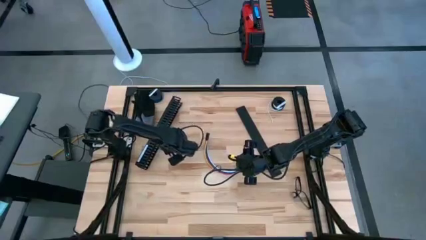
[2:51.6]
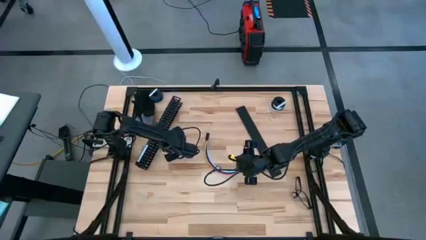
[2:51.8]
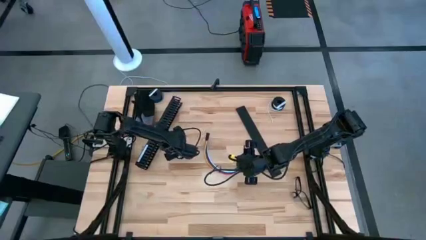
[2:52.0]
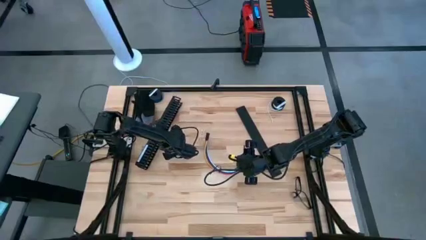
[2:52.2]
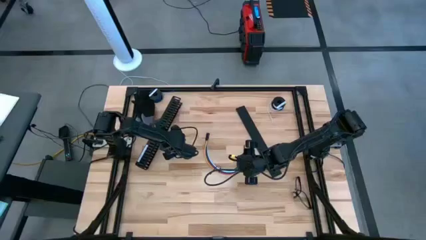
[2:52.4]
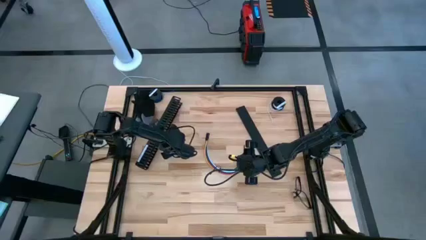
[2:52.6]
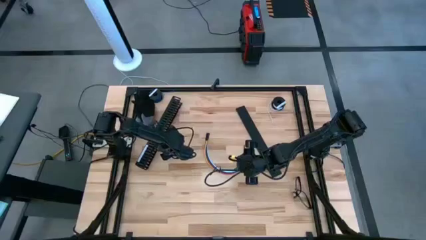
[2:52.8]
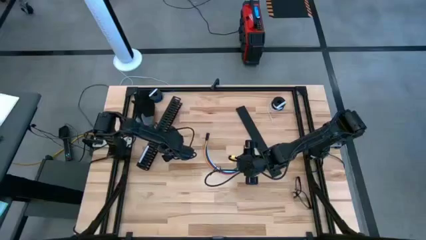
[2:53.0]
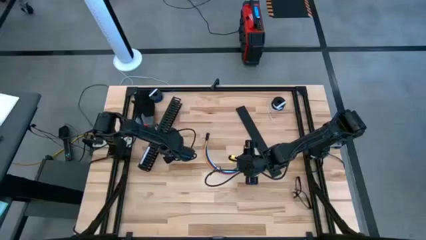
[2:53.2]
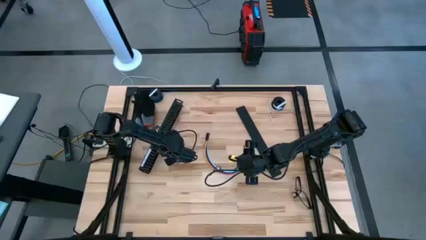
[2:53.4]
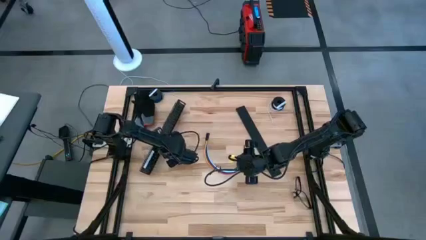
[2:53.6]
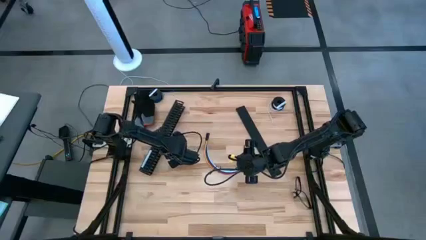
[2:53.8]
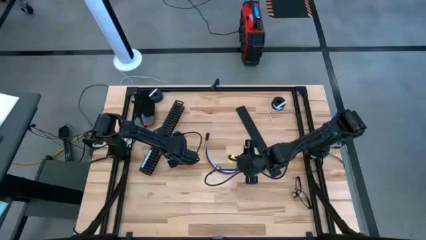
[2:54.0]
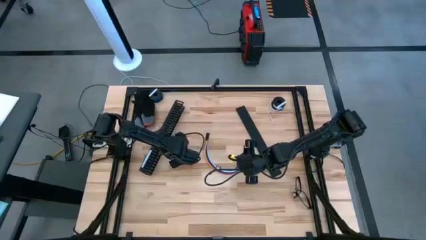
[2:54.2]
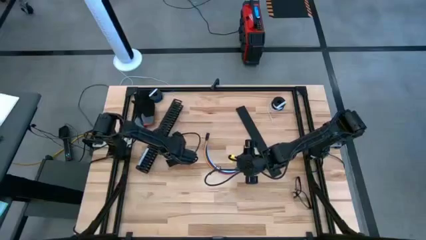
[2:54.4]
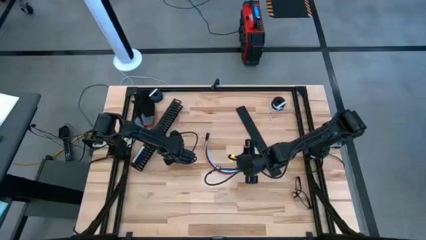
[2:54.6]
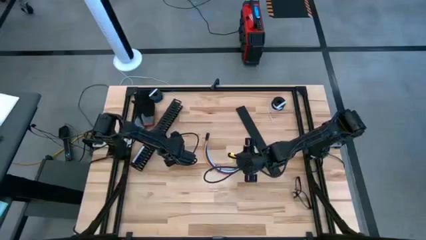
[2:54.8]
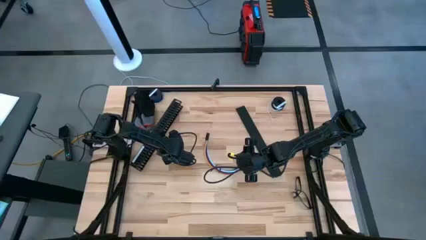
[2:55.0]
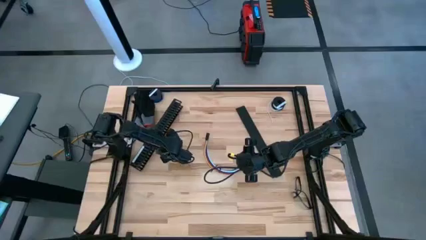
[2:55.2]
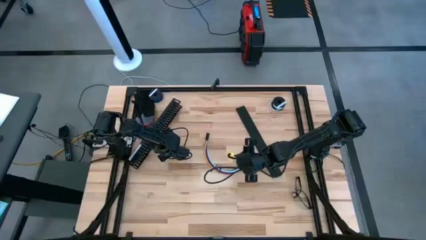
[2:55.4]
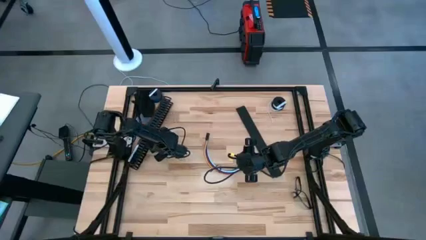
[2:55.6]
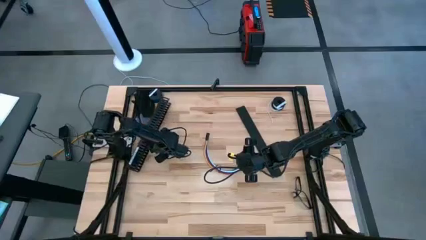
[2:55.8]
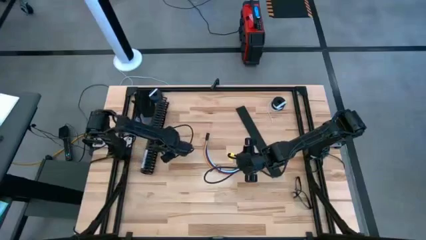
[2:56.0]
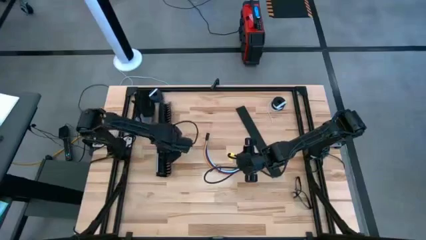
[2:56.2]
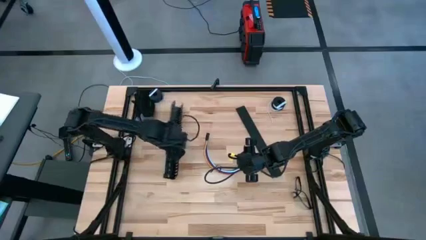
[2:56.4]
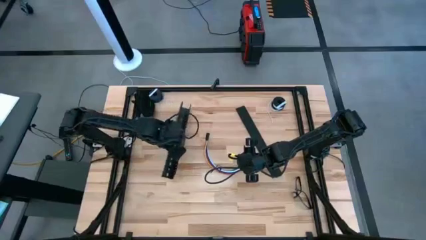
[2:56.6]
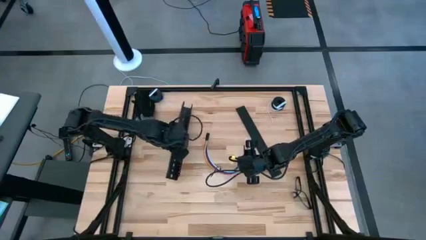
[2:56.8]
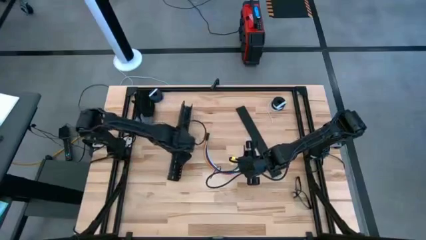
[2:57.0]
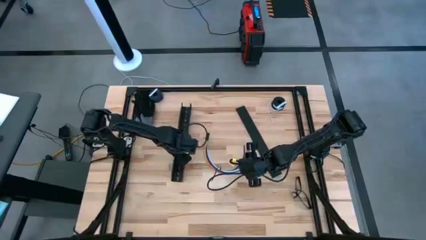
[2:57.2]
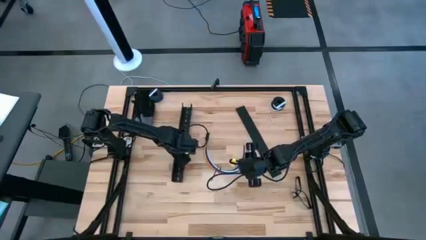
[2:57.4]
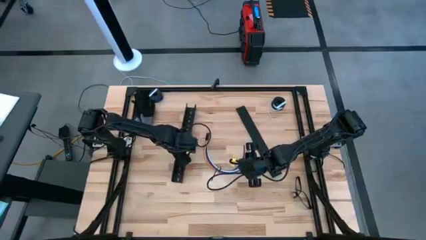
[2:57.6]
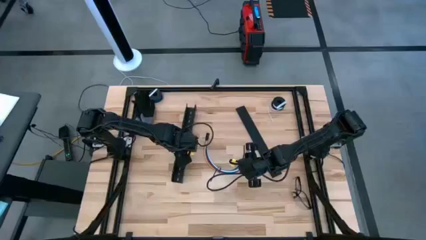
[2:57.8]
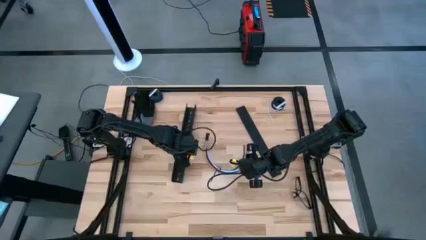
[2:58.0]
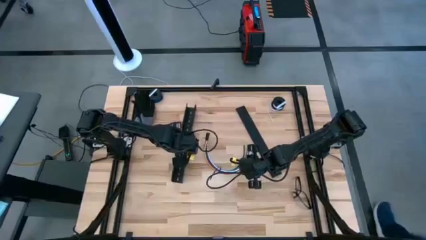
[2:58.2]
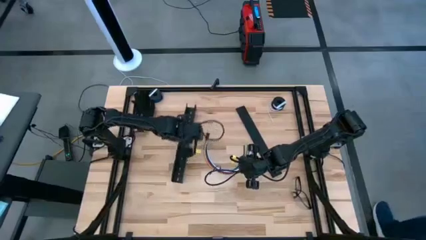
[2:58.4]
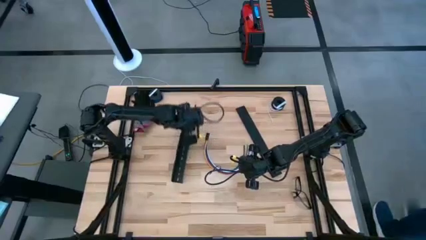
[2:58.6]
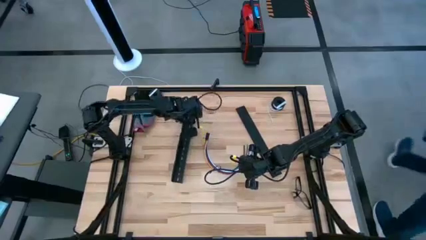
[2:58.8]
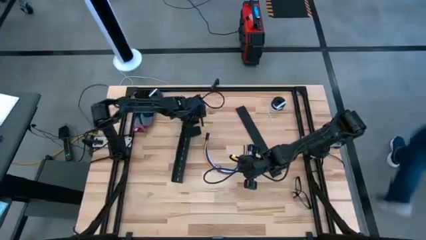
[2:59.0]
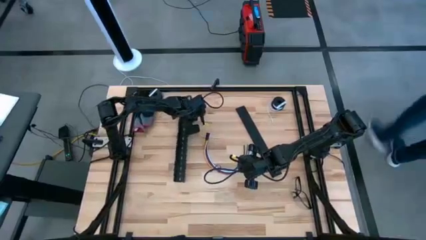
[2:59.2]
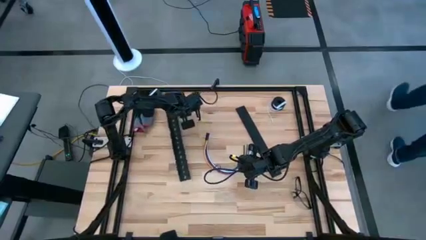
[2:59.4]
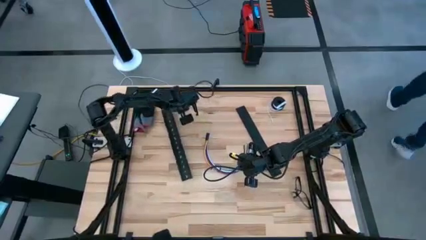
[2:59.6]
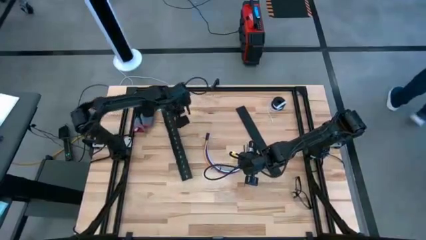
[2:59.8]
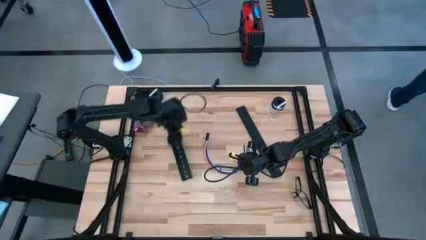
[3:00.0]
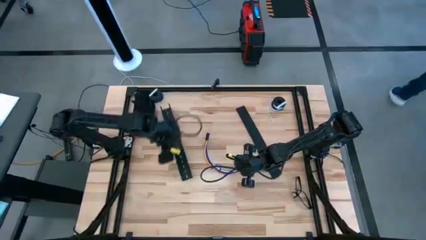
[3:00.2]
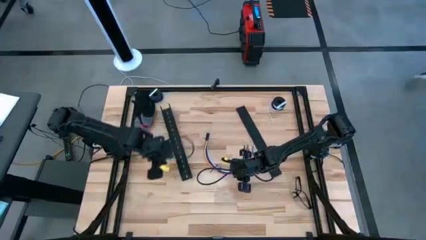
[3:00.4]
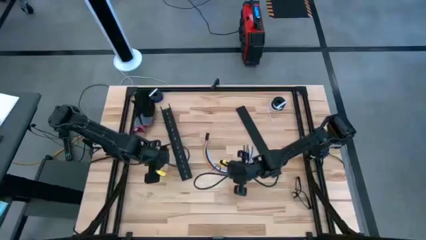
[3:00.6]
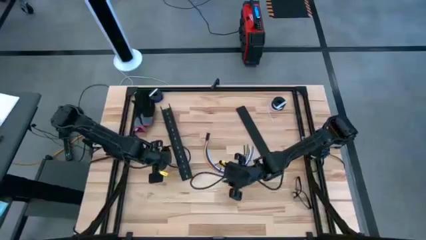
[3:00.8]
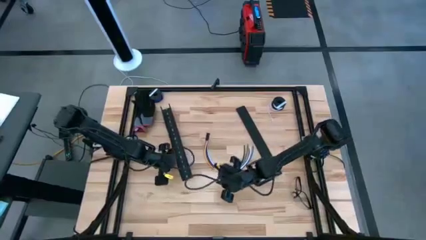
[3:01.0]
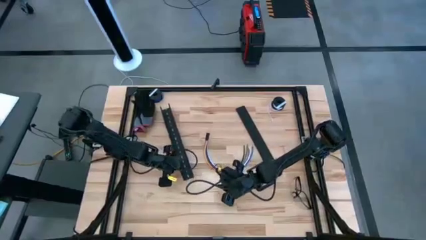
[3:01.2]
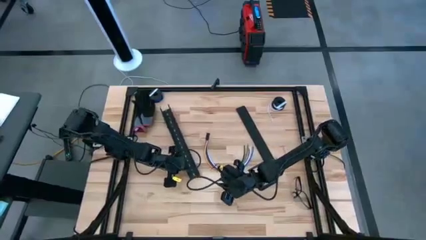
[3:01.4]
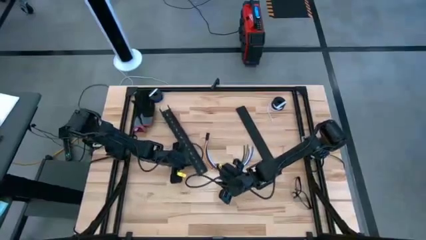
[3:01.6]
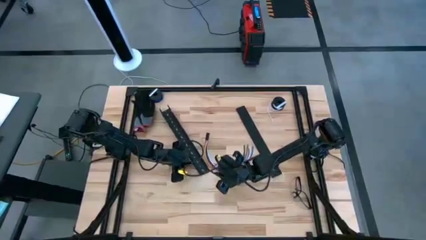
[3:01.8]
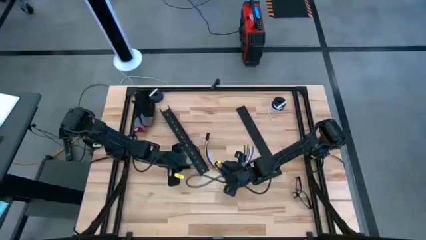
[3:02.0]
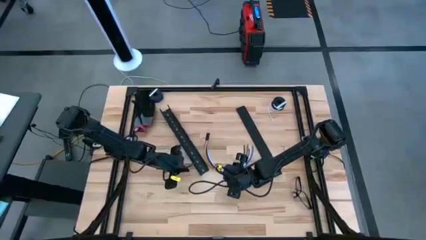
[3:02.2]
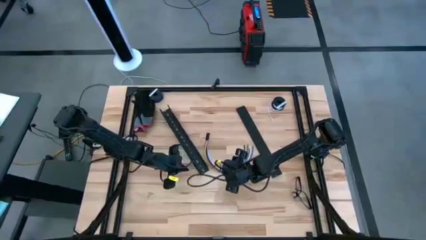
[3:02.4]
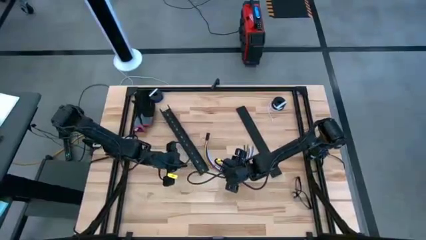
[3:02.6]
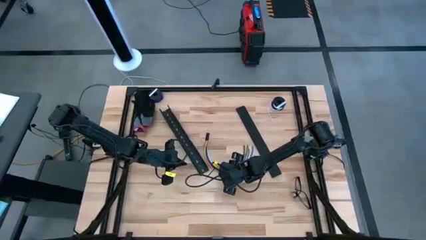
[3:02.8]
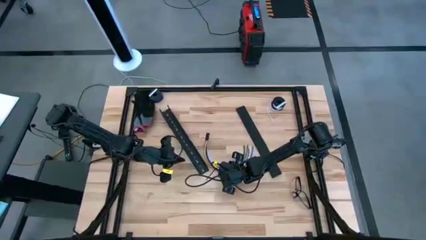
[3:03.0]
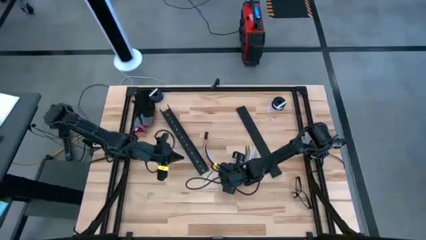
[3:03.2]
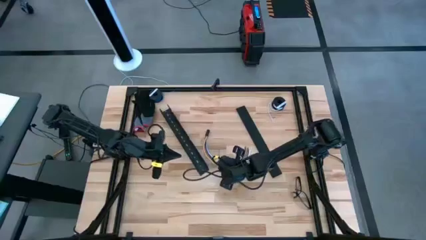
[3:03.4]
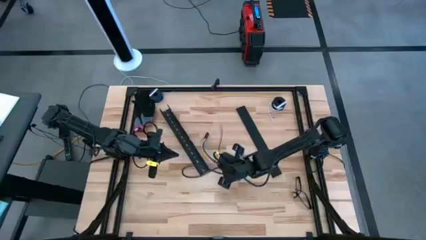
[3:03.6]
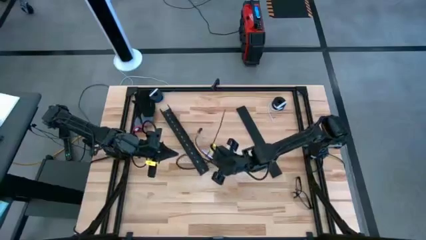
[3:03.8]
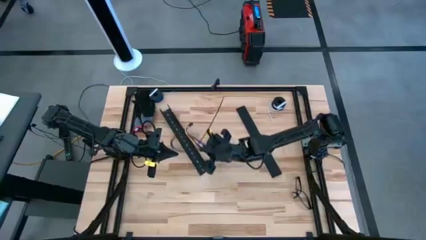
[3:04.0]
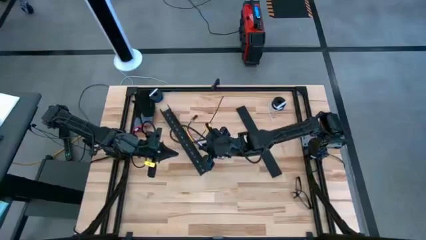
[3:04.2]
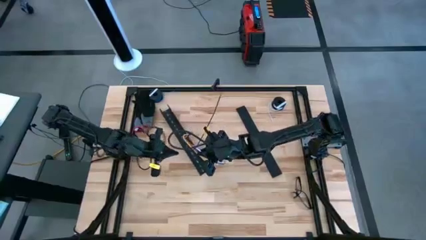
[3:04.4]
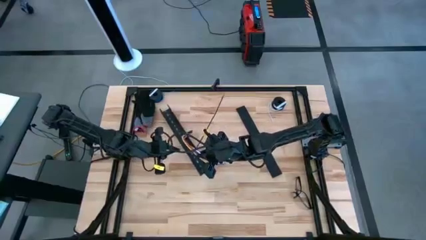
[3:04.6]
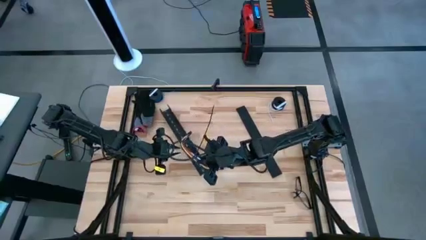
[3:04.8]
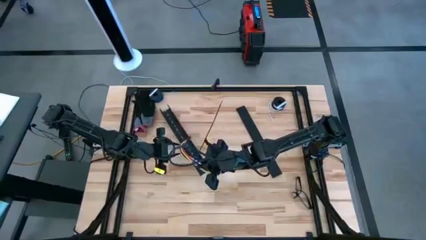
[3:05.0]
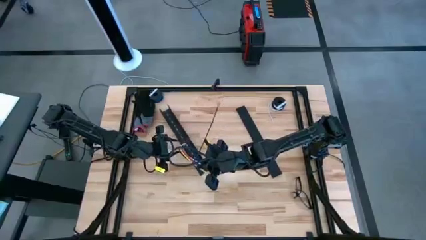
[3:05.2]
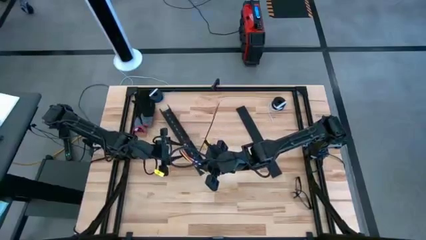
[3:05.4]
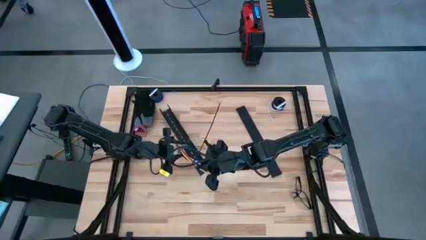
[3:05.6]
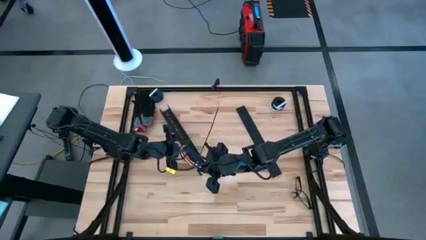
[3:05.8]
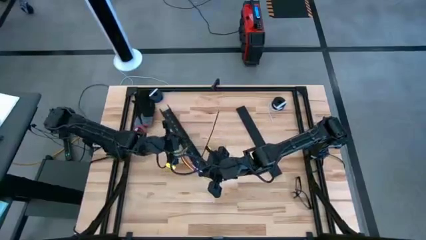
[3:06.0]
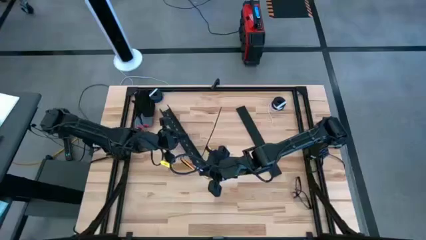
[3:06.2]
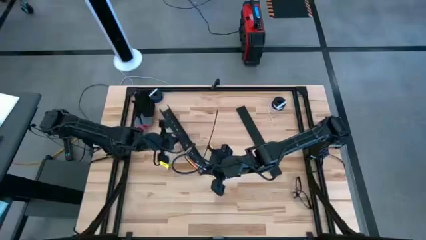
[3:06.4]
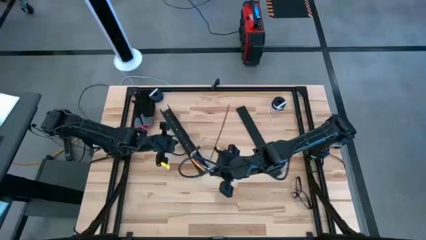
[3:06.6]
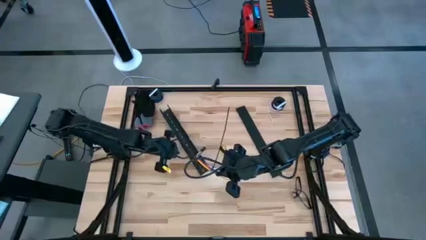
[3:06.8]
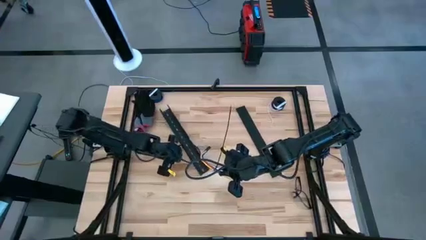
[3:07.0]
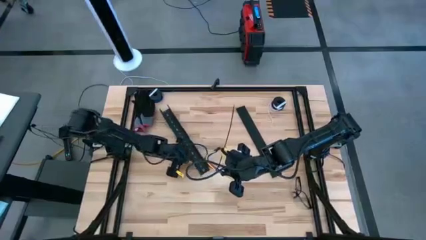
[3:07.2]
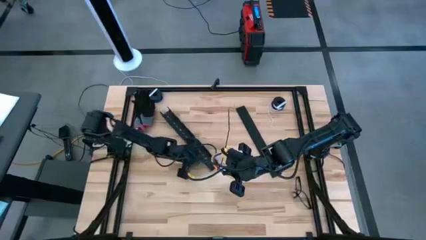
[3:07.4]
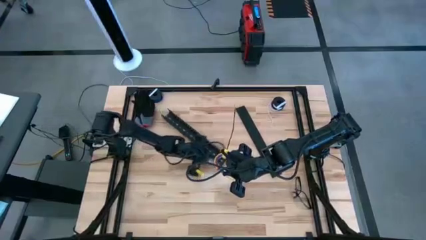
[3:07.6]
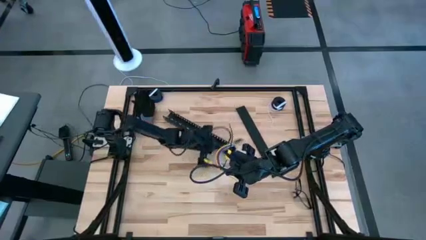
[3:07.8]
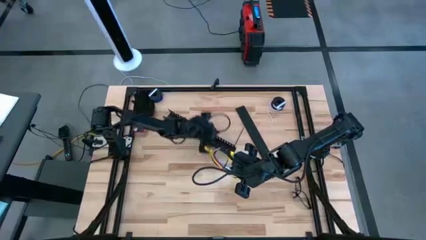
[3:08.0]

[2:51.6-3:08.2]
Task: Ziptie cables
Put the zip tied cable into the black cable duct

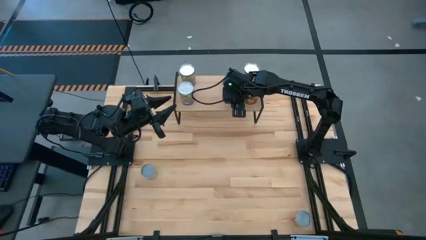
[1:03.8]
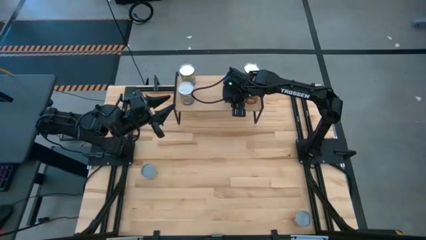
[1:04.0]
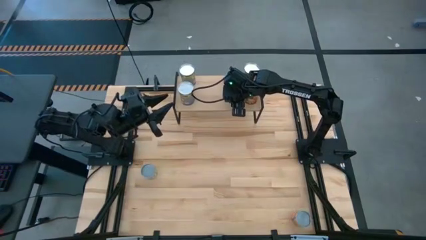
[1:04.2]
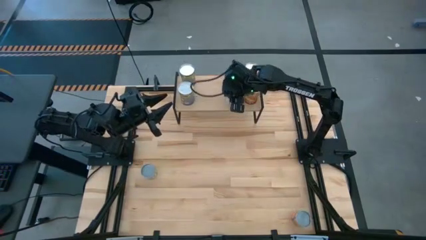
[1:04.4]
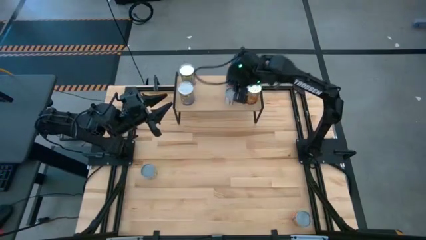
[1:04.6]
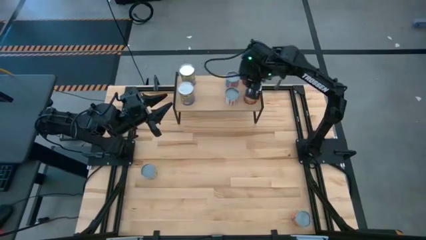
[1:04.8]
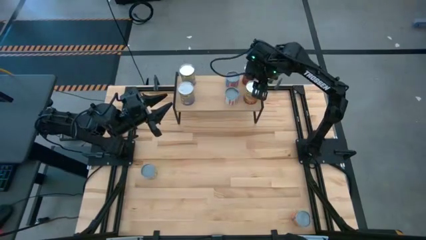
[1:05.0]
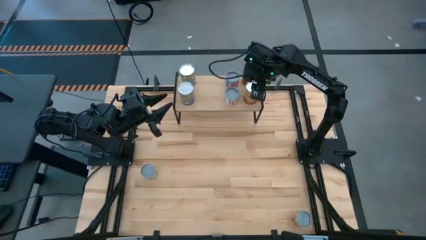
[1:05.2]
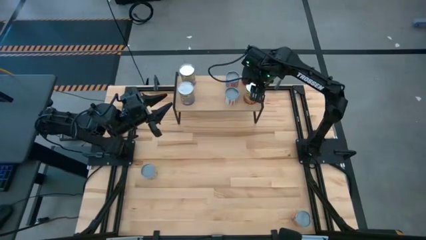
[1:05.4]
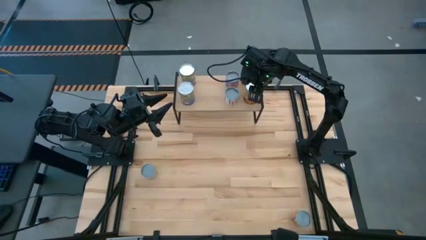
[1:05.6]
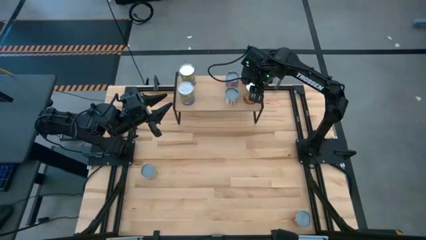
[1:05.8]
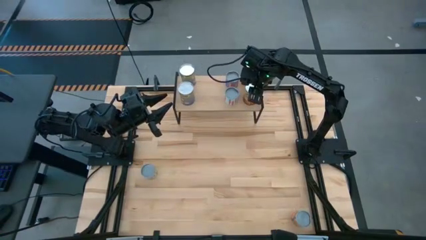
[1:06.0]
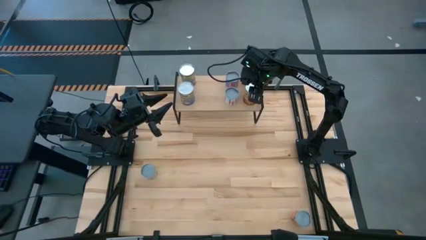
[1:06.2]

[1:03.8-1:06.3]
Task: Pick and place cans onto a shelf
Adjust the canned corn on the shelf
